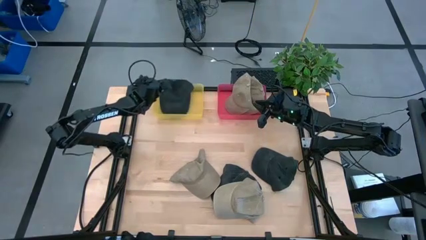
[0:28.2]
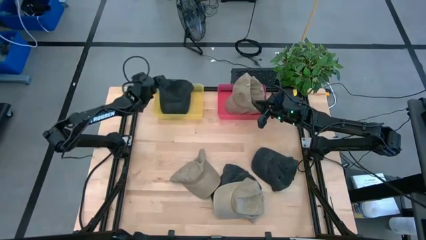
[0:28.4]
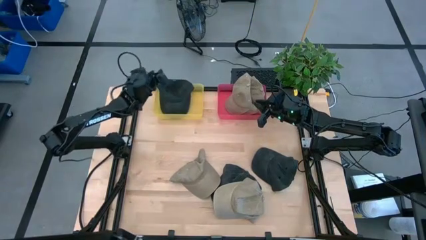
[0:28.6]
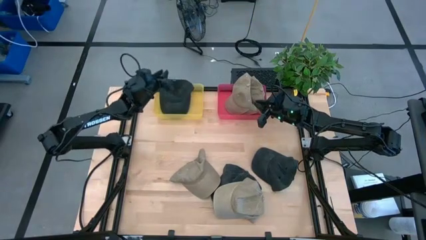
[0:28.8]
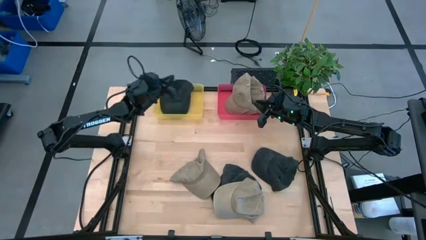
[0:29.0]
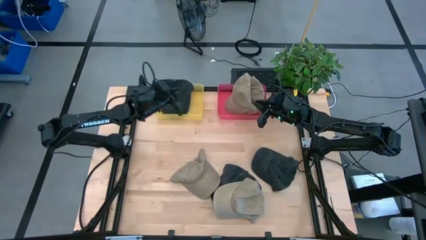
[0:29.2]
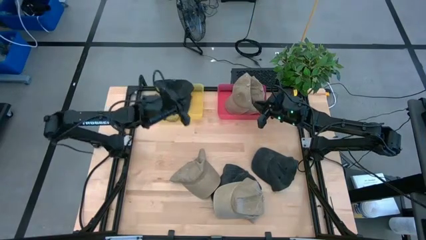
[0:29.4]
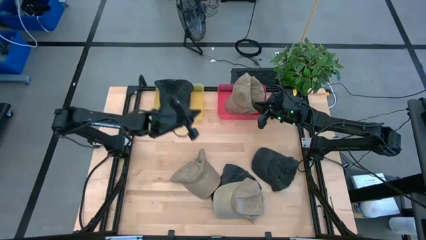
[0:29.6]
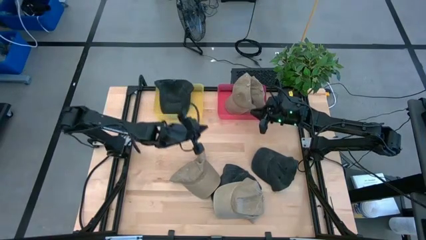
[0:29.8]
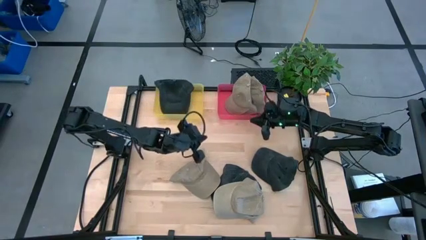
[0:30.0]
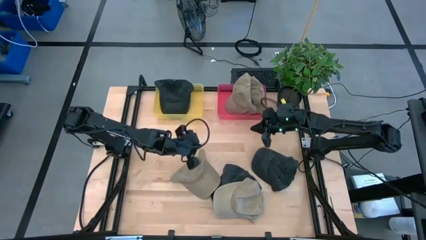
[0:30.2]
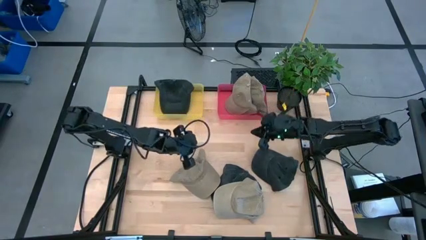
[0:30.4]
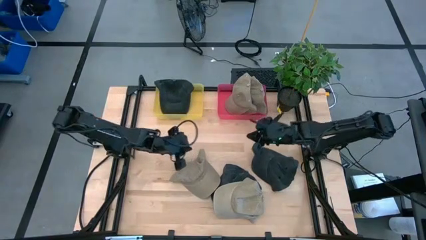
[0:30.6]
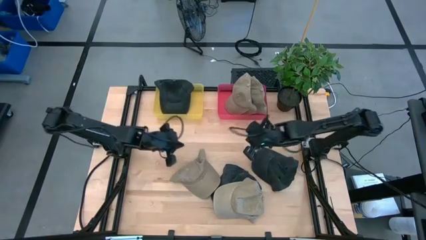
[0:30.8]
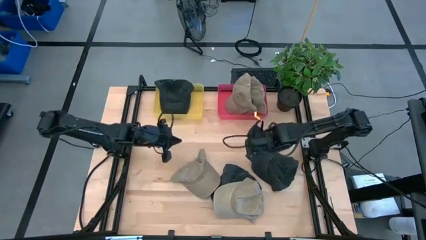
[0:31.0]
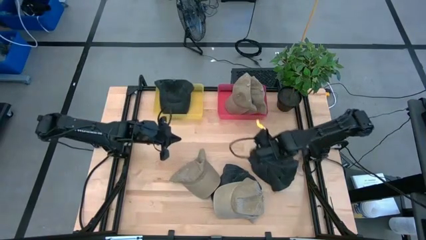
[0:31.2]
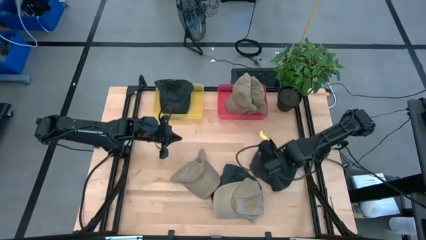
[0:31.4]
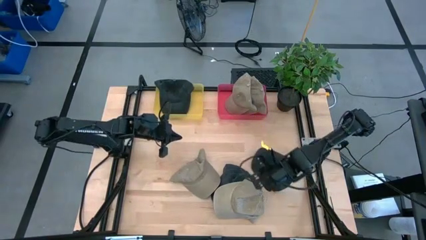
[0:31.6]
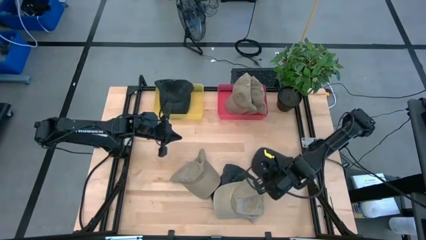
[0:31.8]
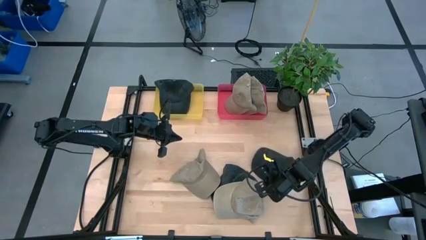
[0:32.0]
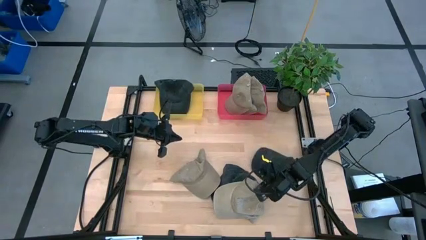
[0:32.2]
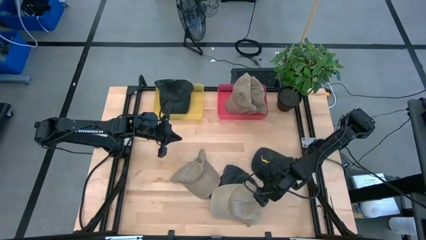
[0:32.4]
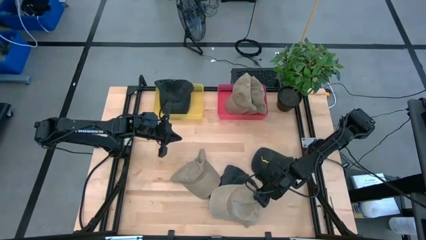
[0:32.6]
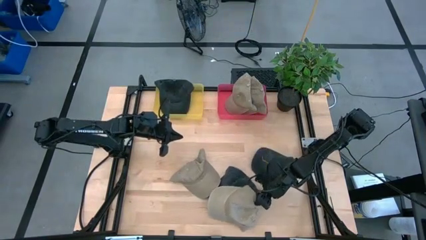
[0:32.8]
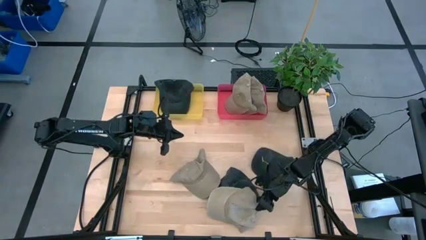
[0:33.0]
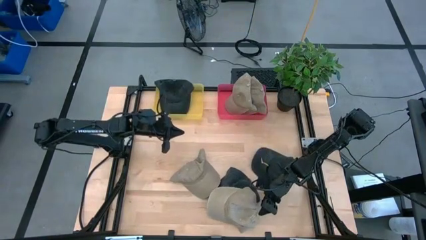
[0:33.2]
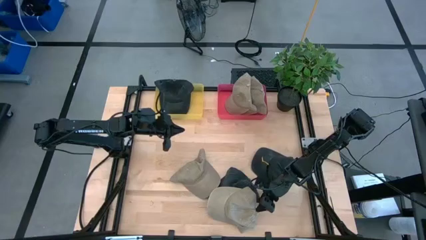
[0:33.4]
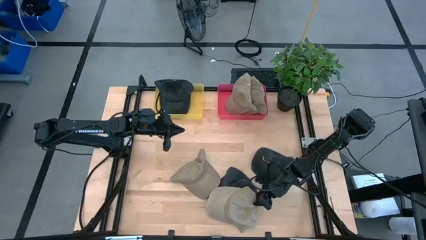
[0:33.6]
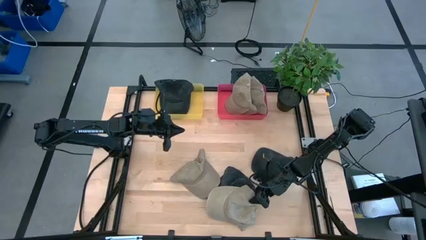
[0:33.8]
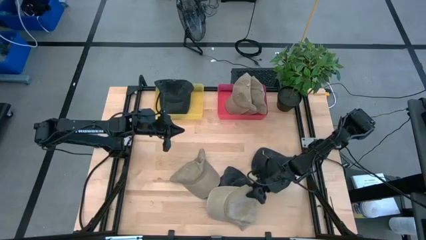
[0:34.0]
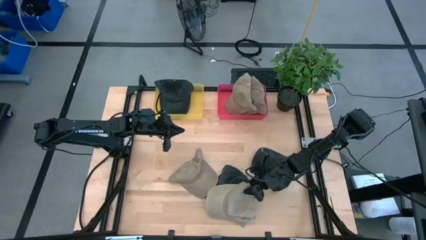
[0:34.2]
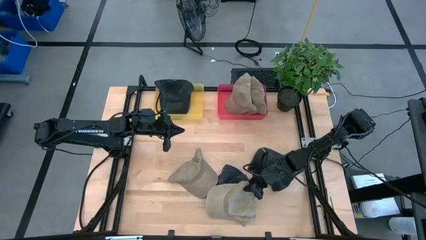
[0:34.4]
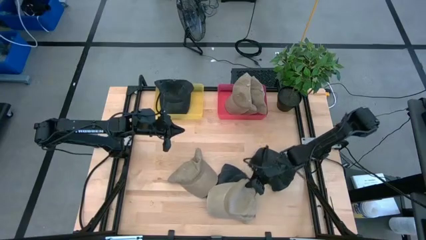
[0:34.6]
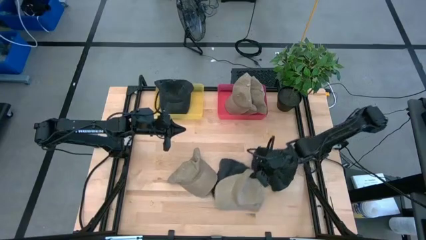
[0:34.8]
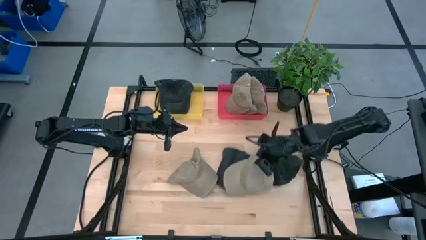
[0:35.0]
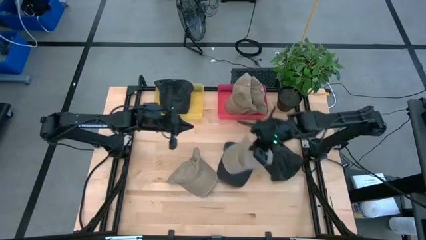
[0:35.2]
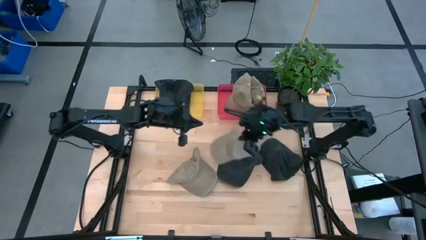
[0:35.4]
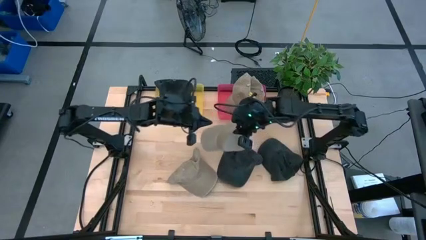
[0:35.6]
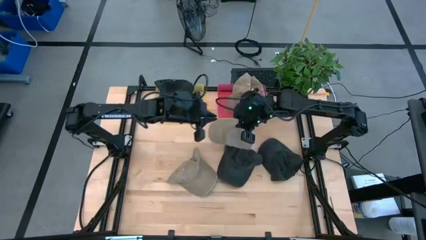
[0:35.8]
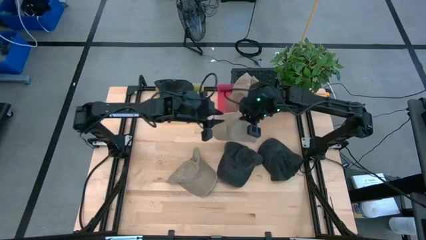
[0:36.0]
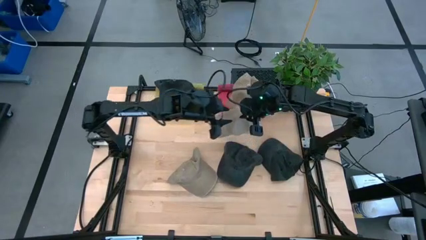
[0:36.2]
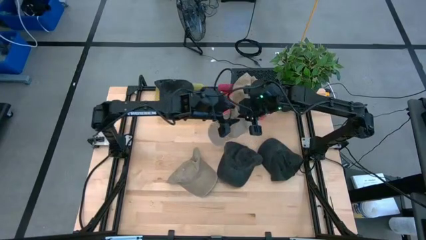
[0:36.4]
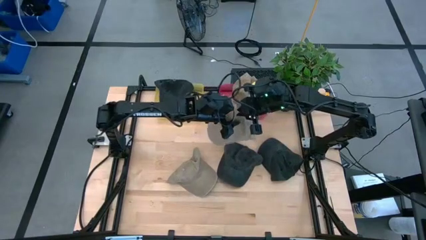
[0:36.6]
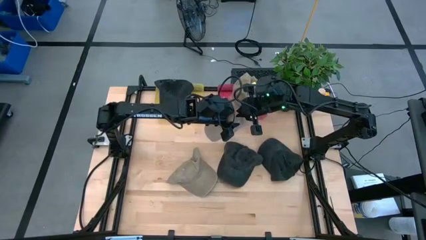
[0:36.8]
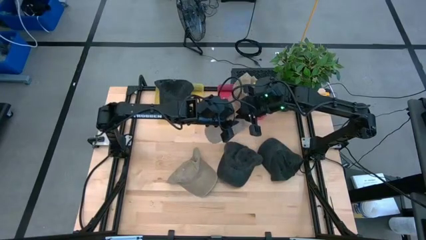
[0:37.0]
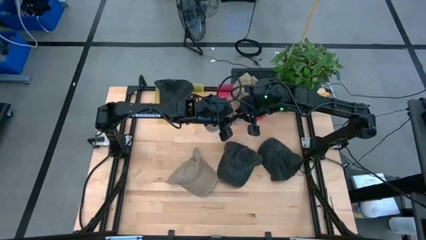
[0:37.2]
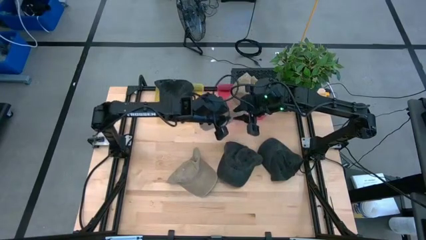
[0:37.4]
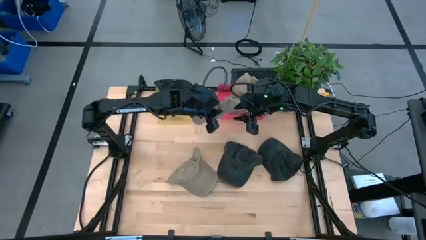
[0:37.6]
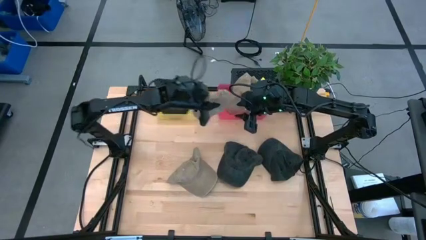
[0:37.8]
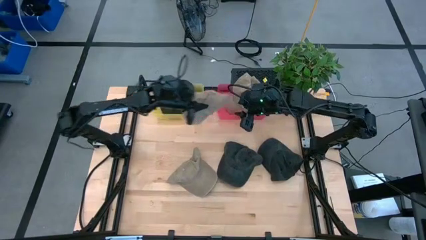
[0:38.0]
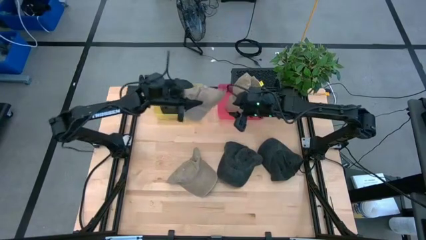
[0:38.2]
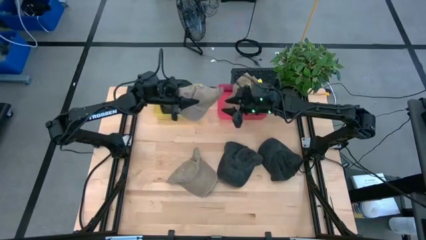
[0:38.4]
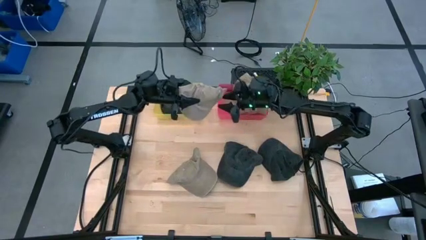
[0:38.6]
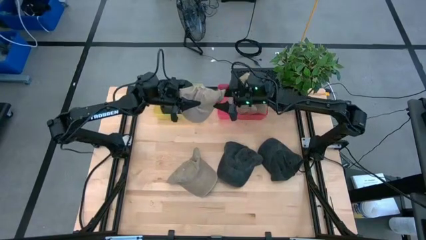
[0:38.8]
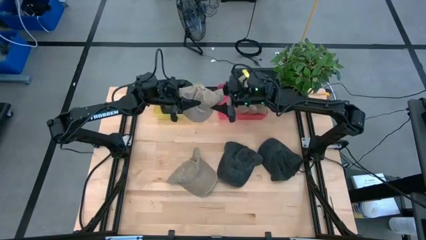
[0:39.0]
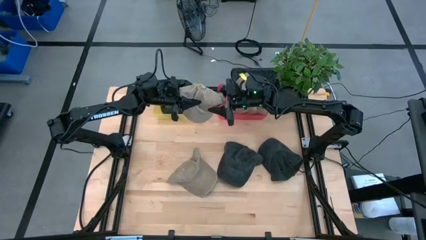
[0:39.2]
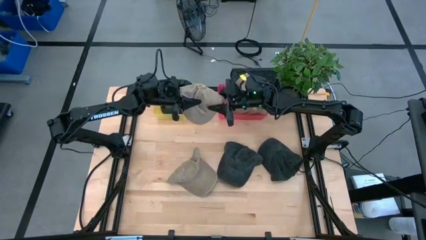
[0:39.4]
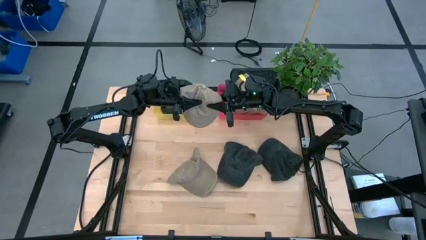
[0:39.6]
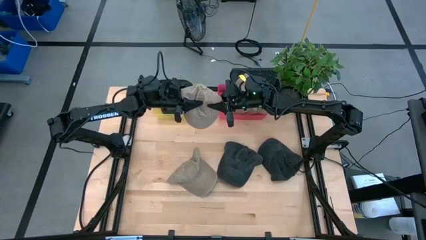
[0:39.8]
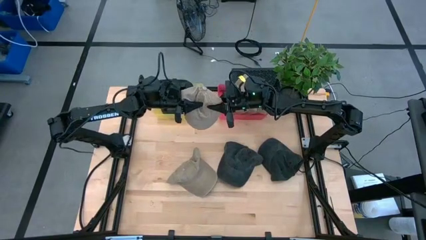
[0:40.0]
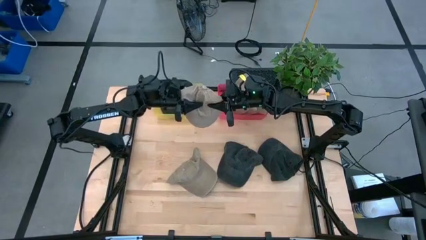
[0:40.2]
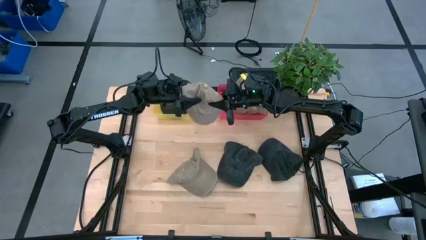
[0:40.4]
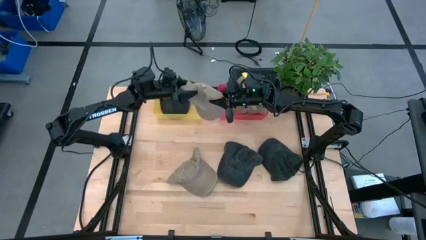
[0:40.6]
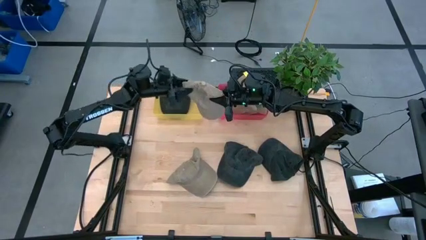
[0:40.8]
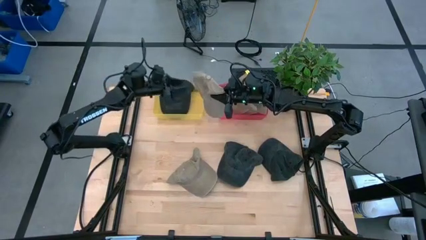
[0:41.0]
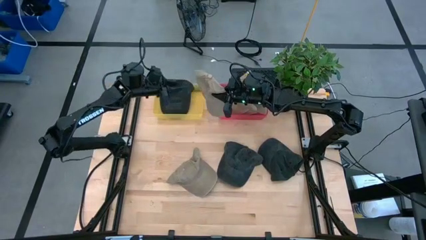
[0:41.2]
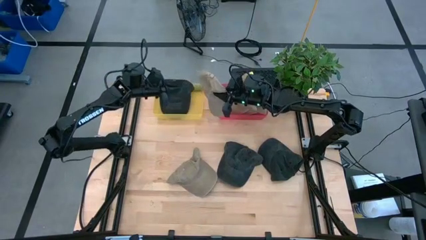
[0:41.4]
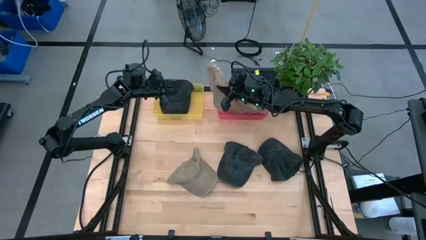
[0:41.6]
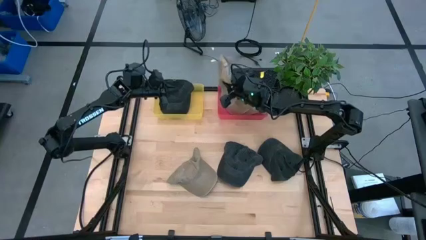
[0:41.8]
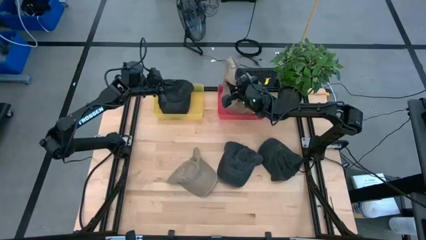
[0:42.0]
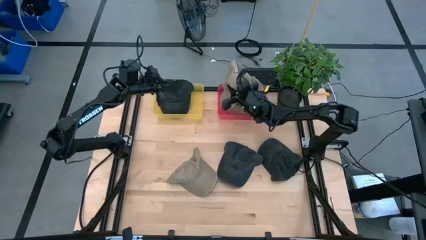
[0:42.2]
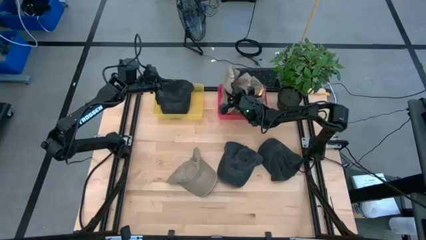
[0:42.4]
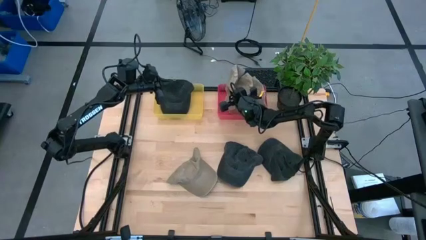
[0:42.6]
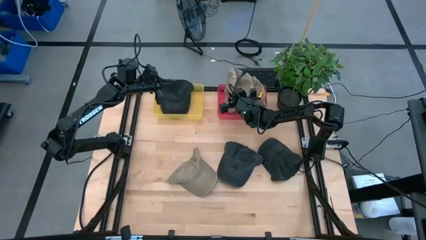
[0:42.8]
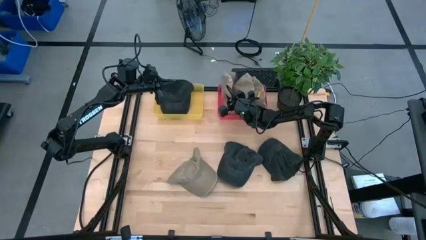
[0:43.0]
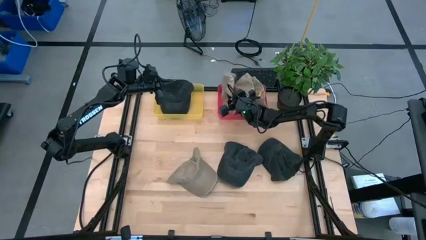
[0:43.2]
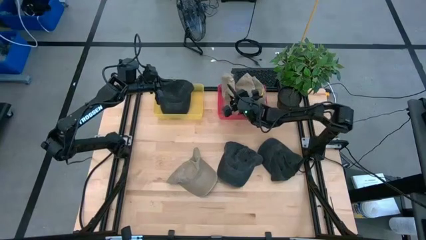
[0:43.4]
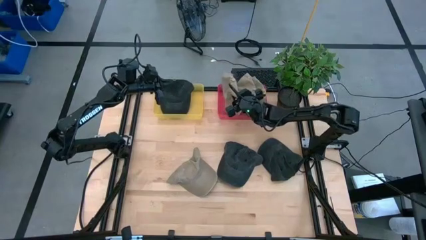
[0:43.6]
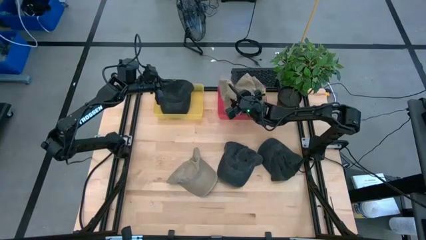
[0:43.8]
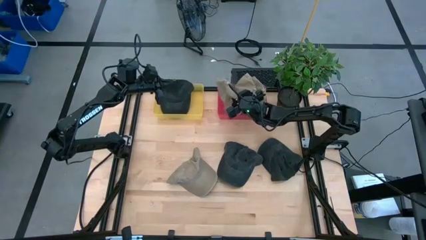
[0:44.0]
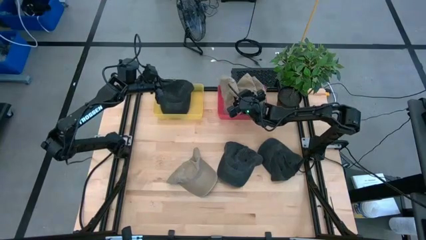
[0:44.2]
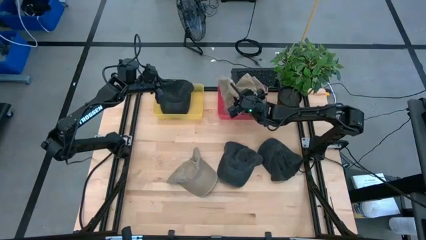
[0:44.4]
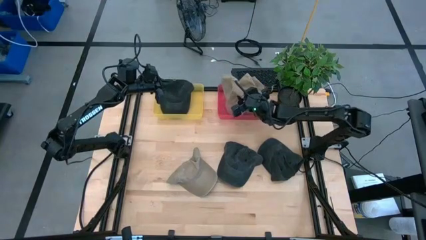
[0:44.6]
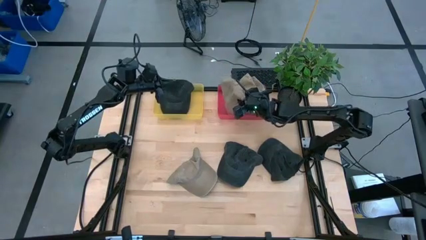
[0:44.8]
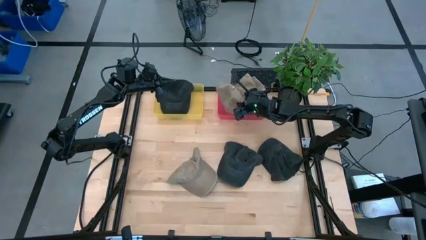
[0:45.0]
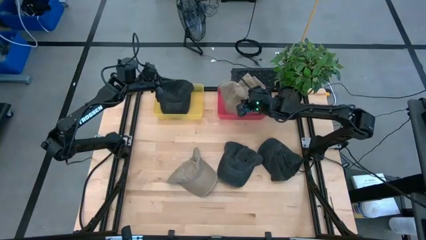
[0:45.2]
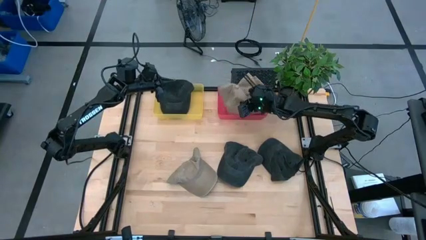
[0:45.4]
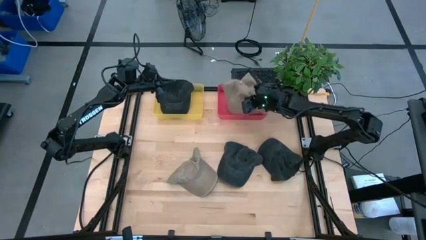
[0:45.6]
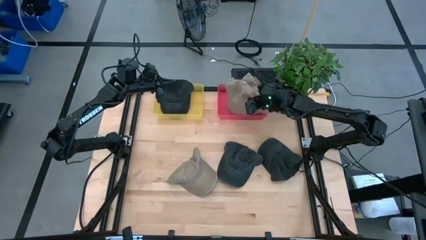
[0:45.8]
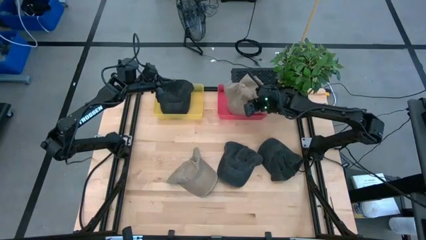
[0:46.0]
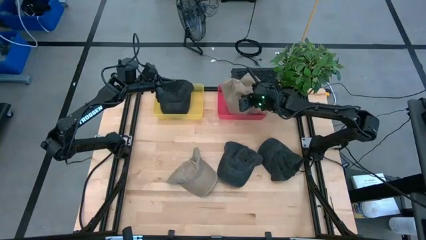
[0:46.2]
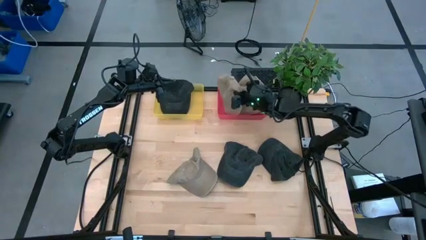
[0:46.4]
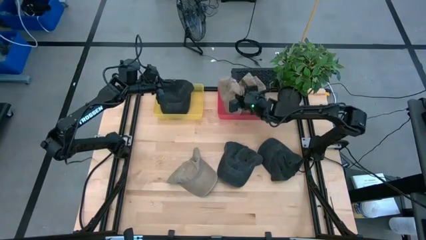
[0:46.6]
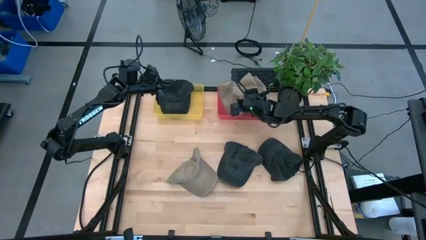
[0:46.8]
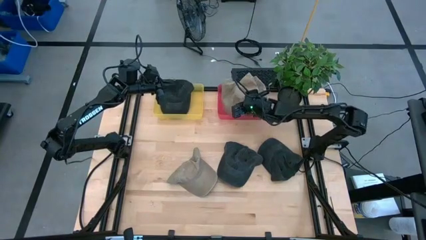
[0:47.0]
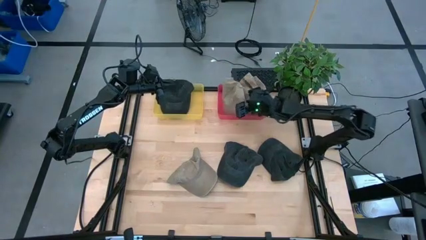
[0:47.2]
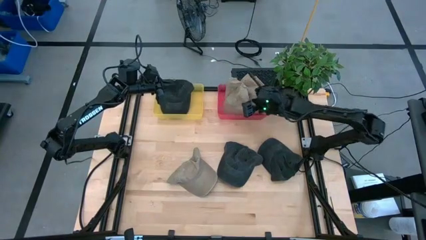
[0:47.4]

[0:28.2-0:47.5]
Task: Pick & Place hat
Put the brown cap into the red bin
